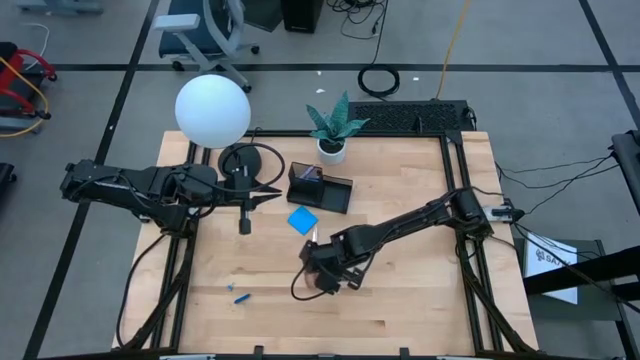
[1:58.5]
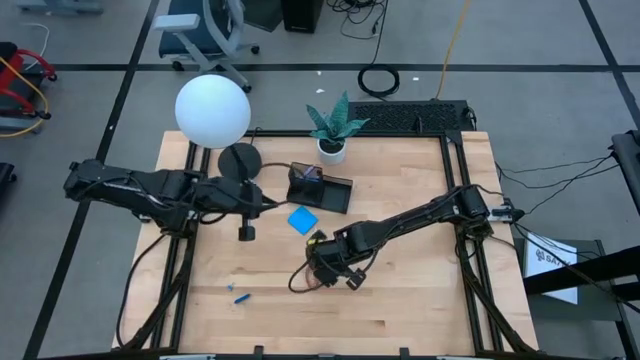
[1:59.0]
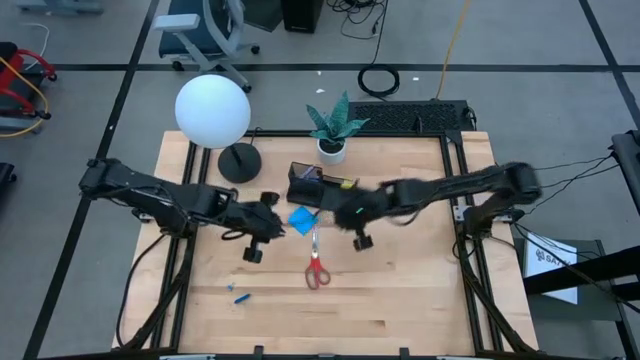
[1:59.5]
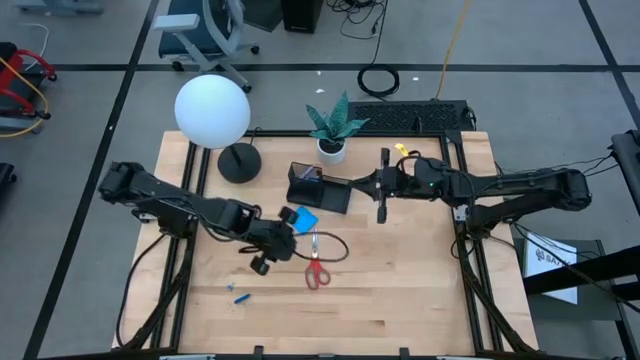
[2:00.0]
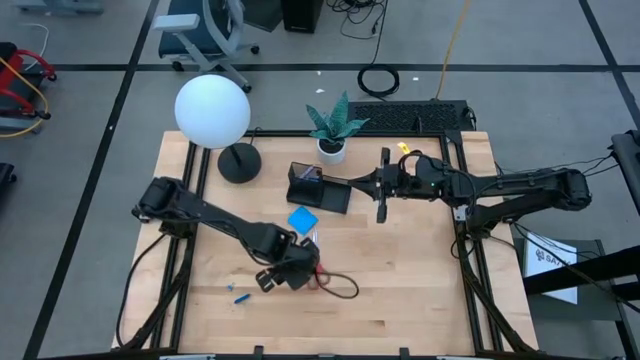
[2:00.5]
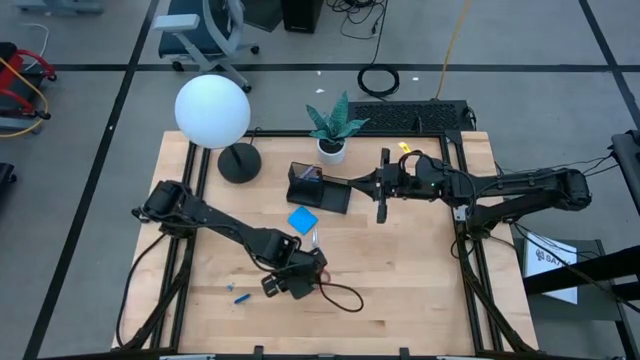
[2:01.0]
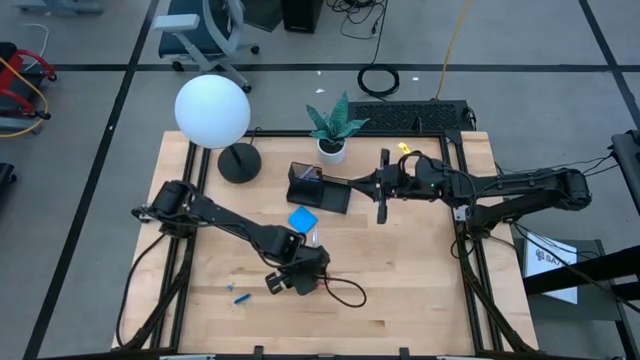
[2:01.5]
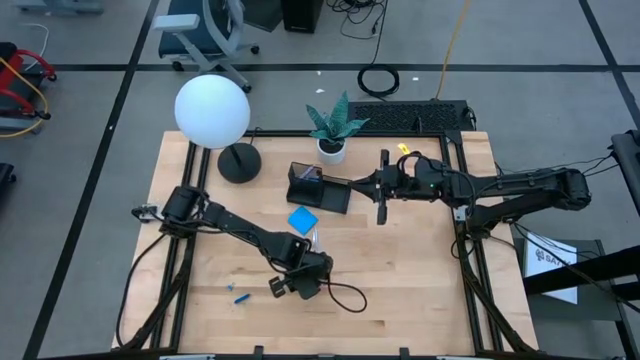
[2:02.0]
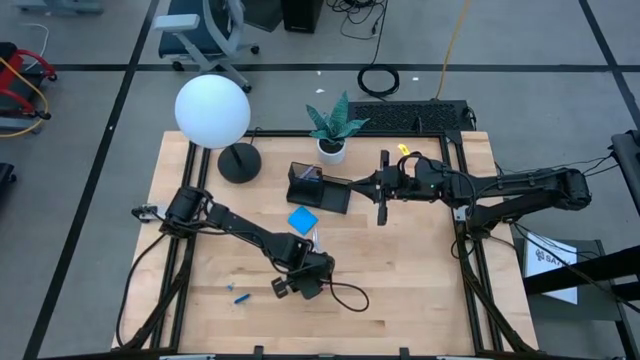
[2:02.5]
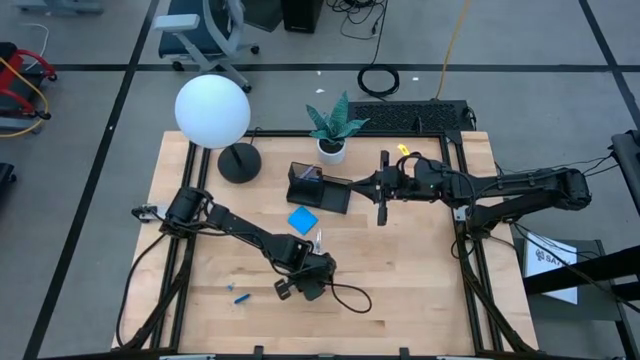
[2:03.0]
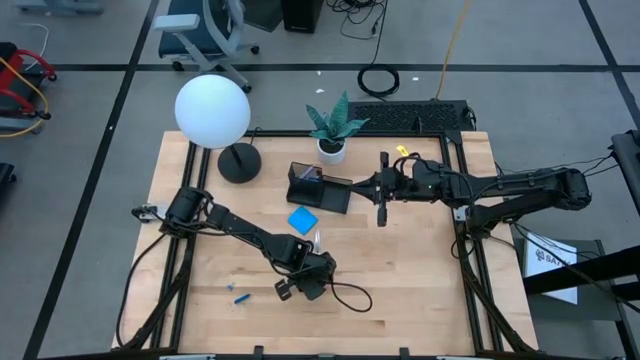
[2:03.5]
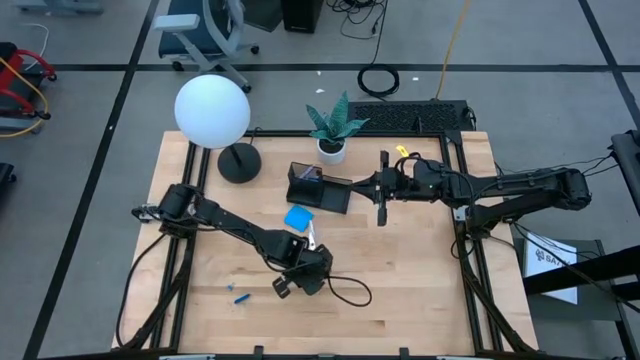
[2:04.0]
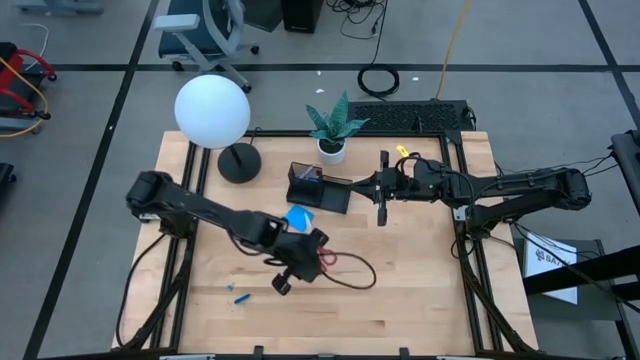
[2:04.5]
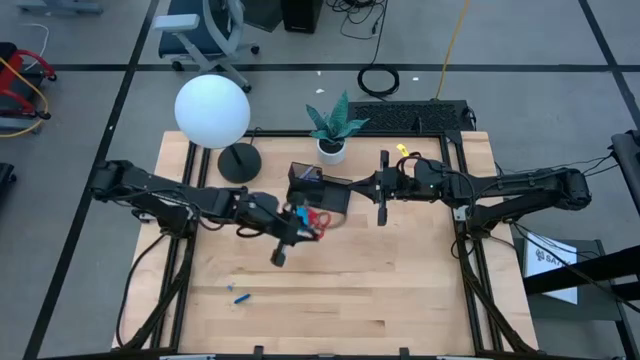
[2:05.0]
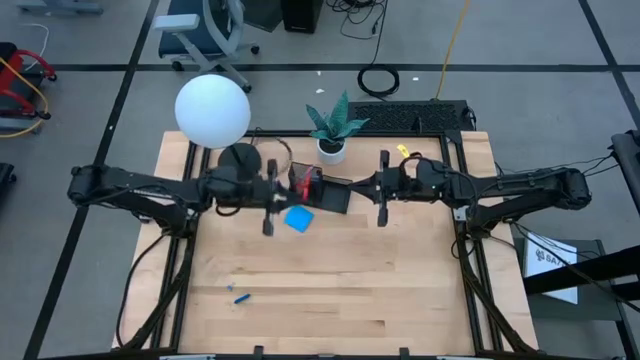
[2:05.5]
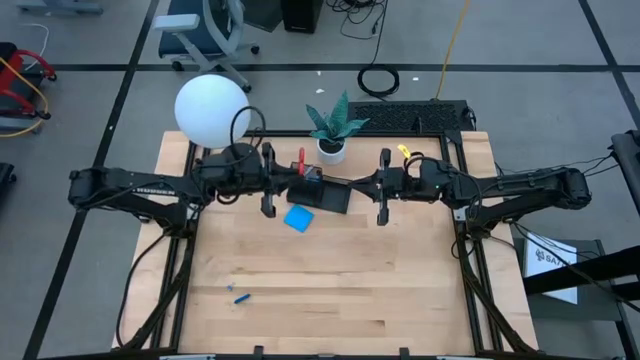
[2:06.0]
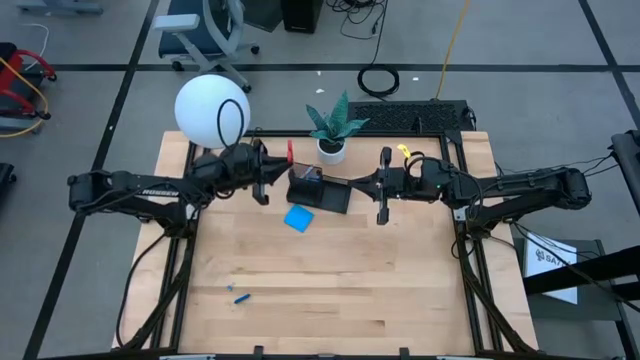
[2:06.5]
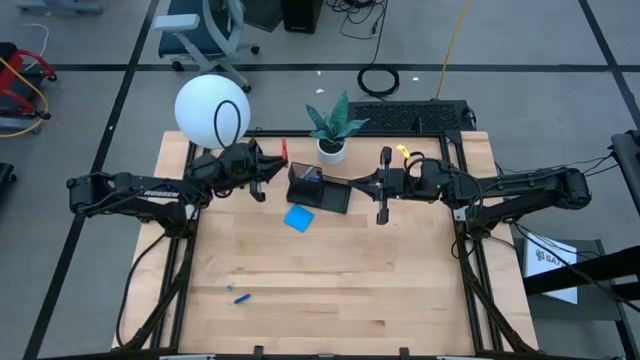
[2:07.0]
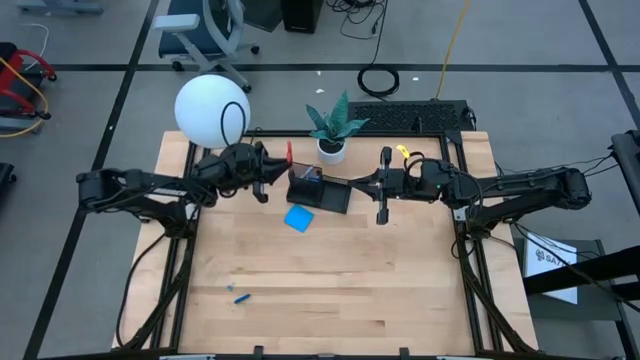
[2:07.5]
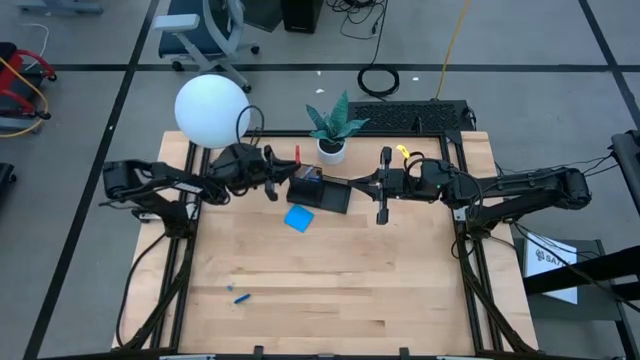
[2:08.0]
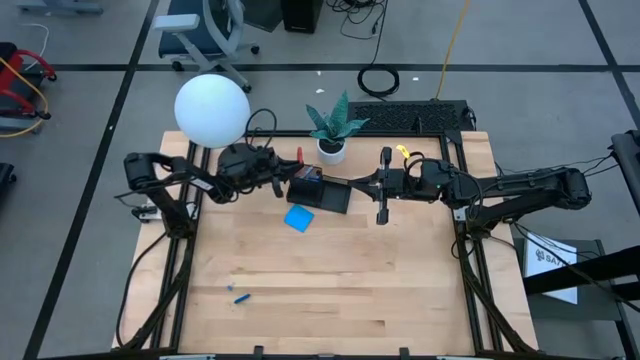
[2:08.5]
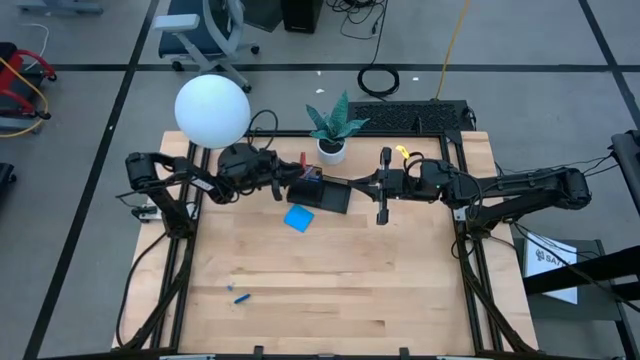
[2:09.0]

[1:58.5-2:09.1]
Task: Pick and place office supplies into organizer
Put the red scissors into the desk organizer

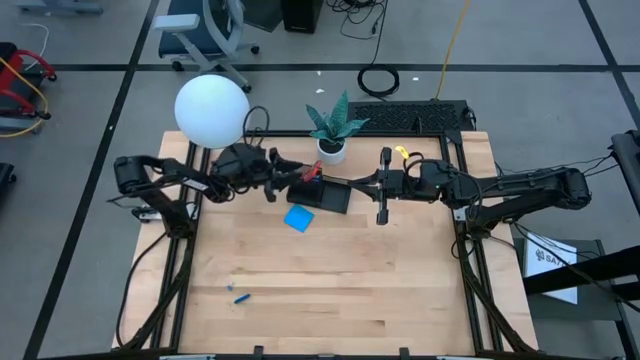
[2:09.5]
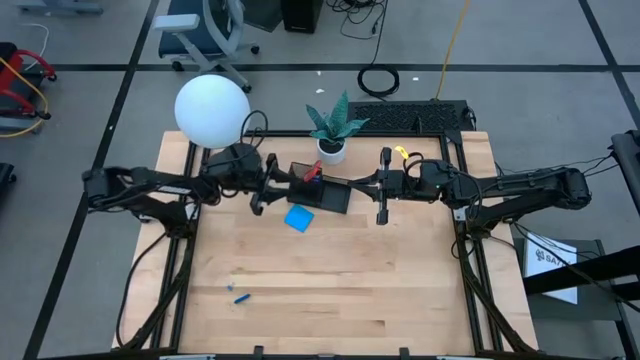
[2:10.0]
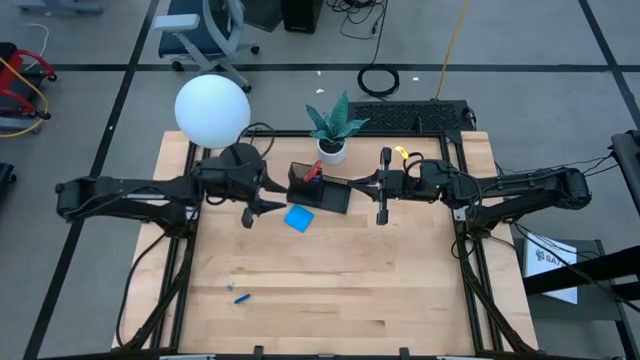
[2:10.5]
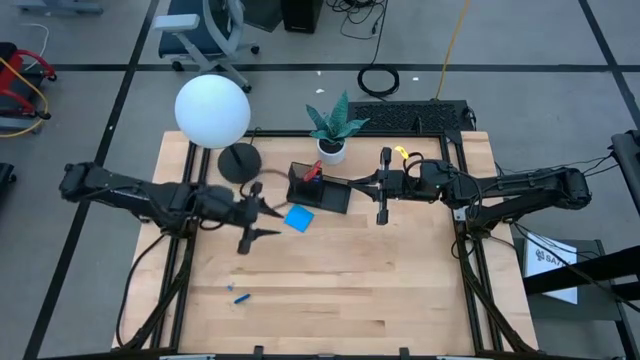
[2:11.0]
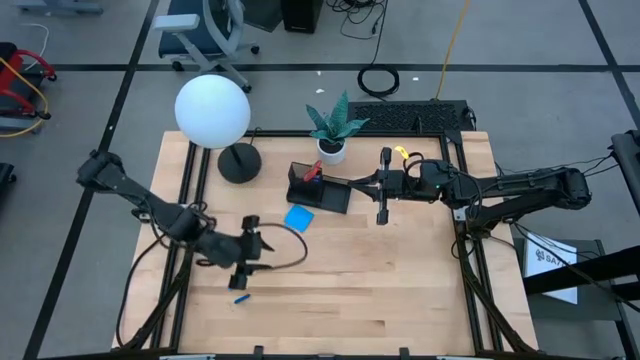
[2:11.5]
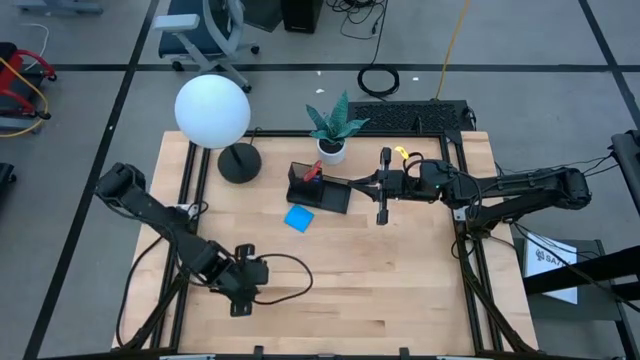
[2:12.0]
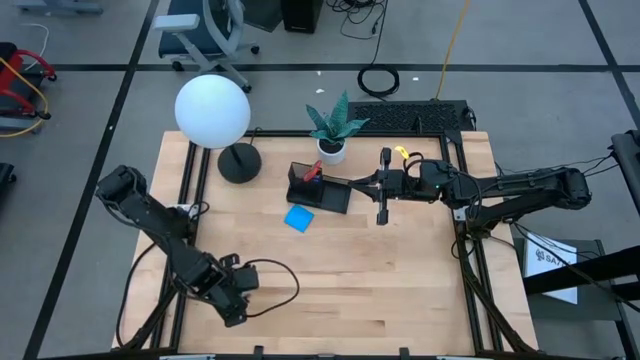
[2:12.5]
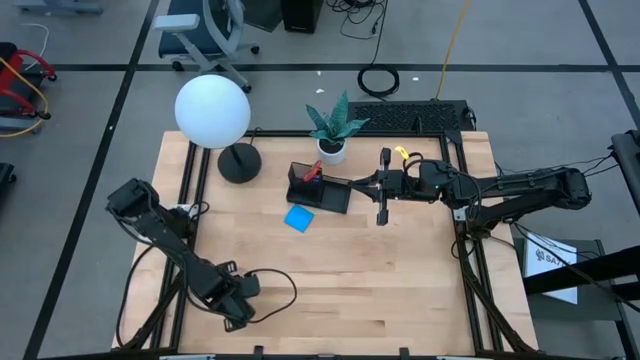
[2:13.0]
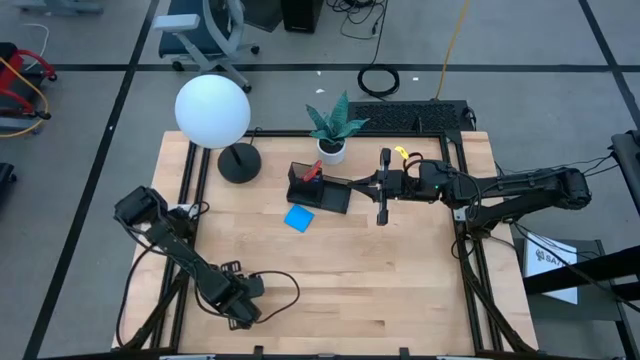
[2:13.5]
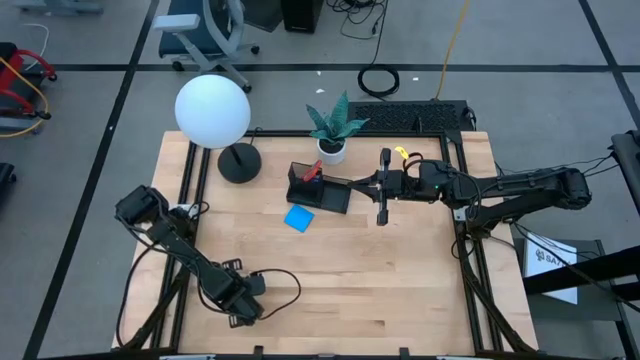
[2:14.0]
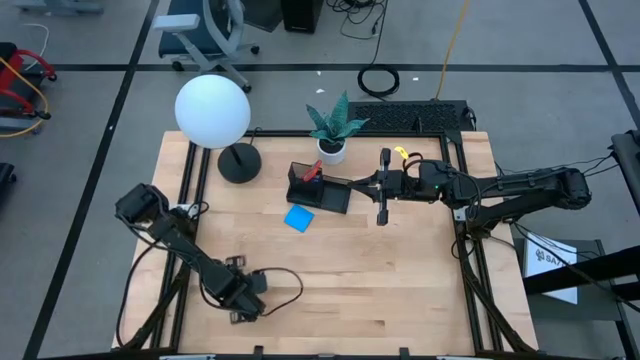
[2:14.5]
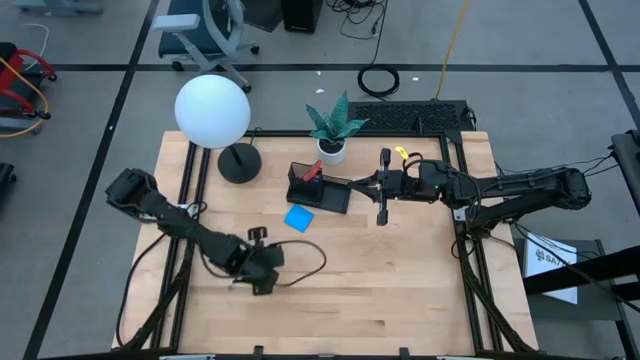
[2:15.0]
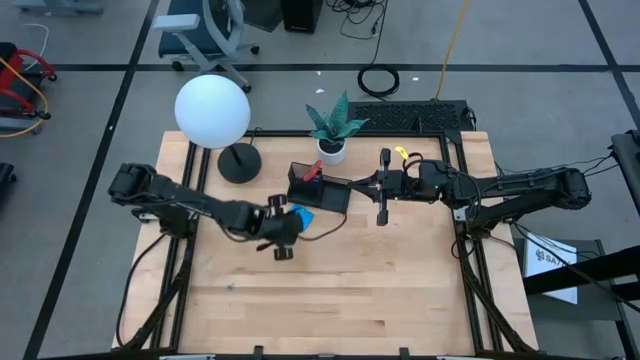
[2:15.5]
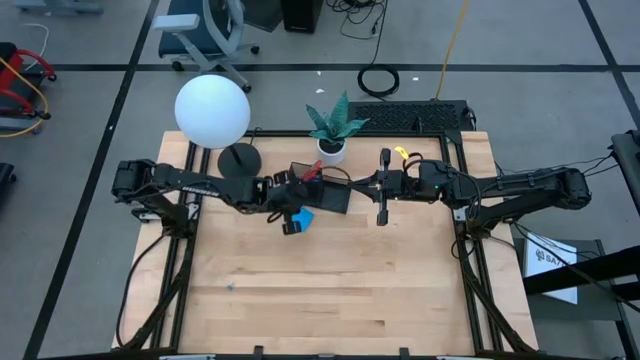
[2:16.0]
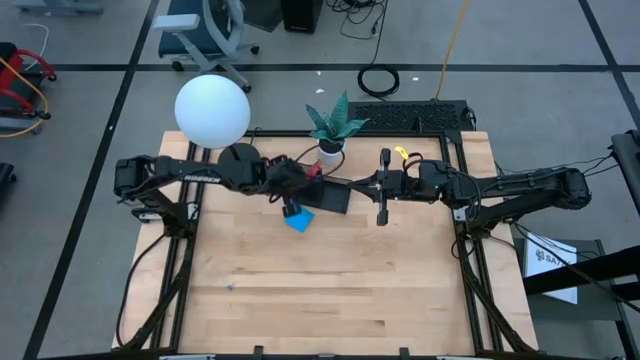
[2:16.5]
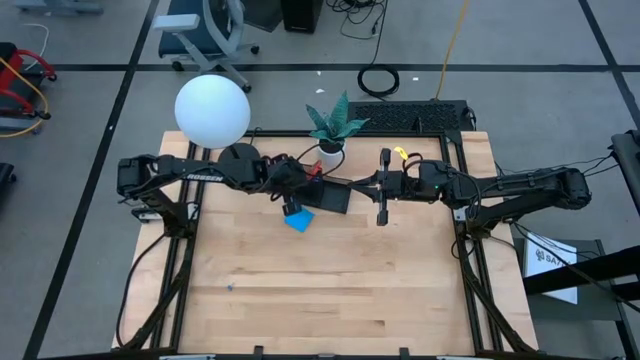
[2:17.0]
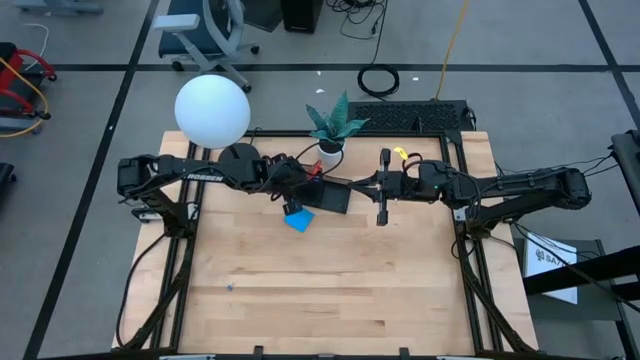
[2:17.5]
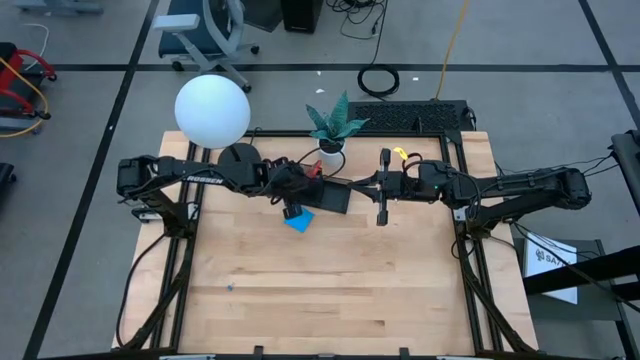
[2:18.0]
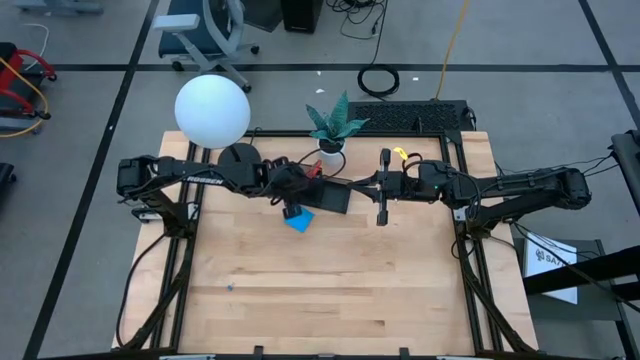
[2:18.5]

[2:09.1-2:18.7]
Put the blue eraser into the desk organizer

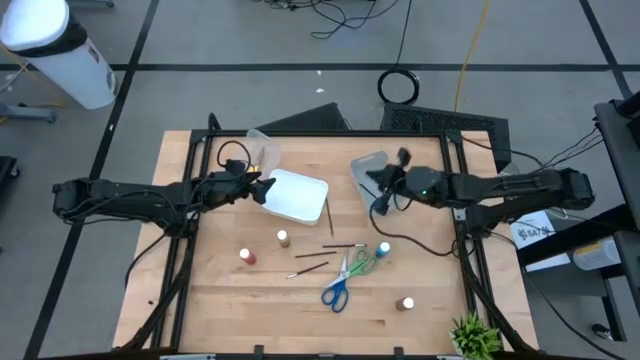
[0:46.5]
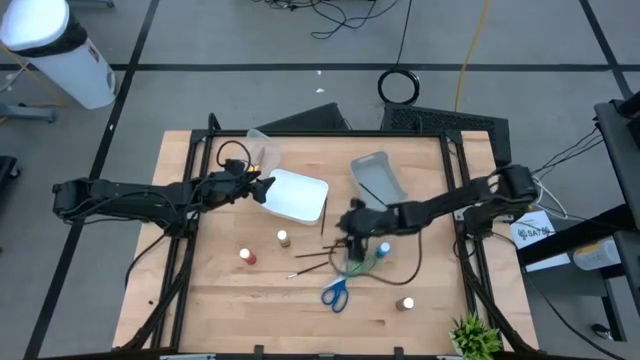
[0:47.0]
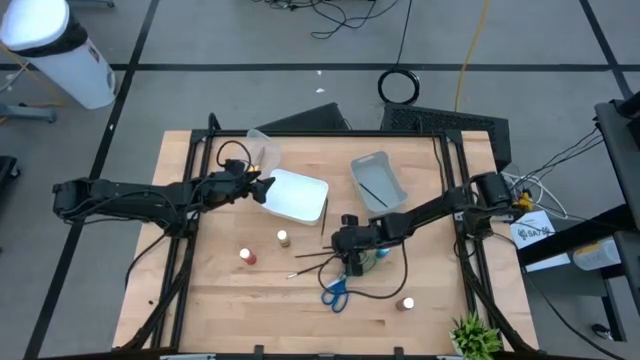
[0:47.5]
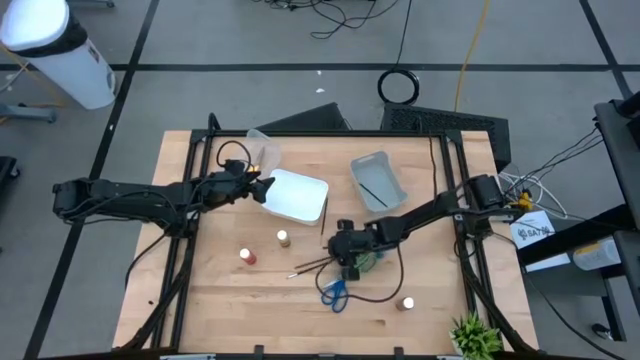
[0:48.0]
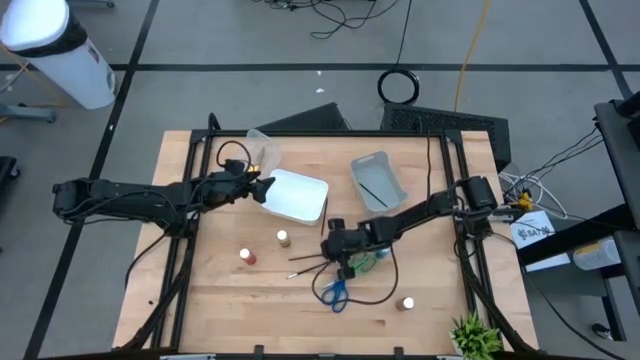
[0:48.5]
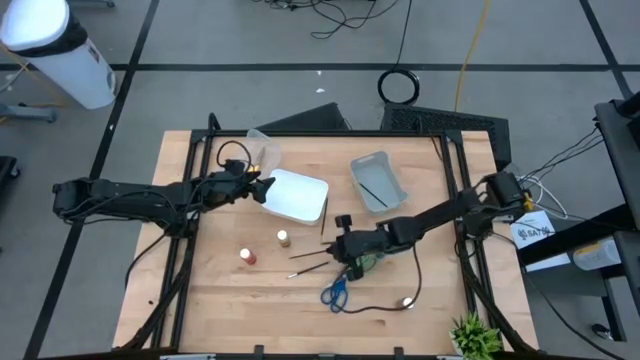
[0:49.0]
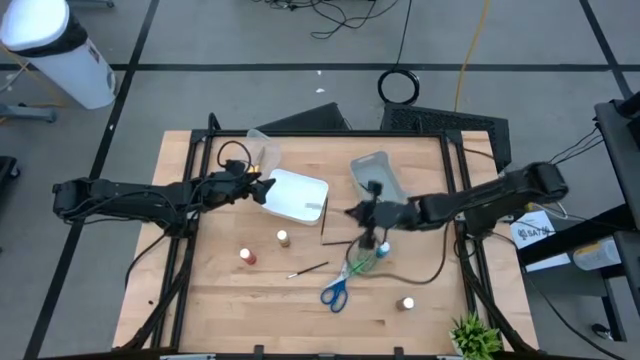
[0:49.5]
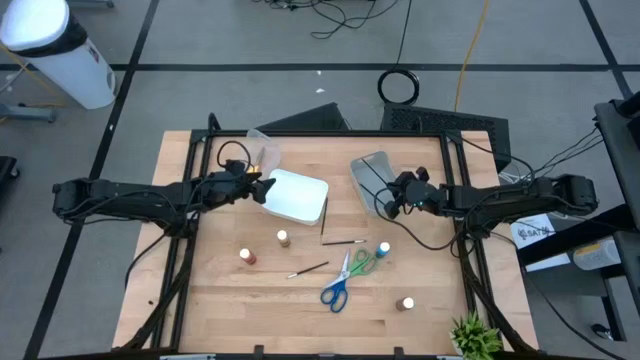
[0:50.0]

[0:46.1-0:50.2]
Task: Pick & Place Paint Supplies
Put the bottom gold and black paintbrush into the gray bin
